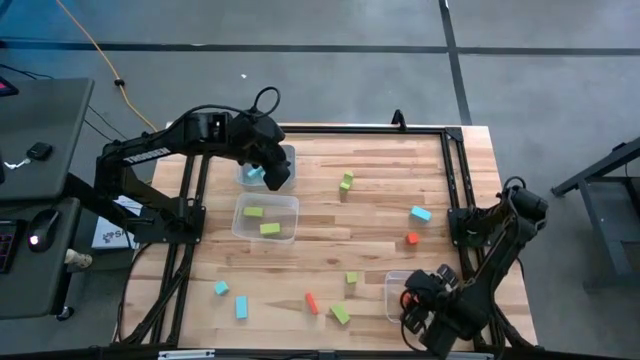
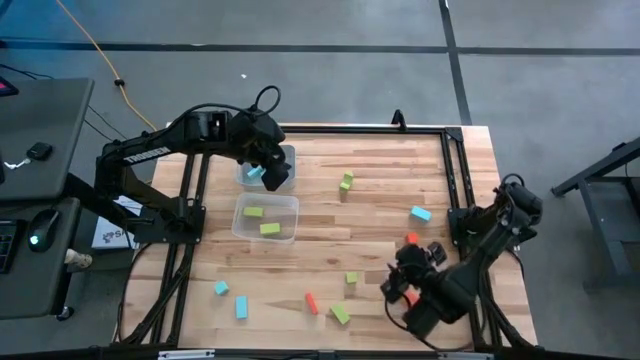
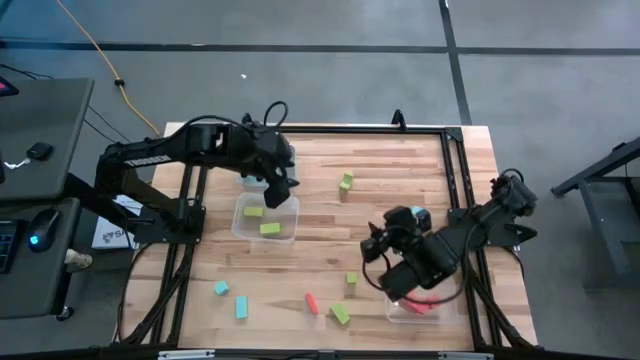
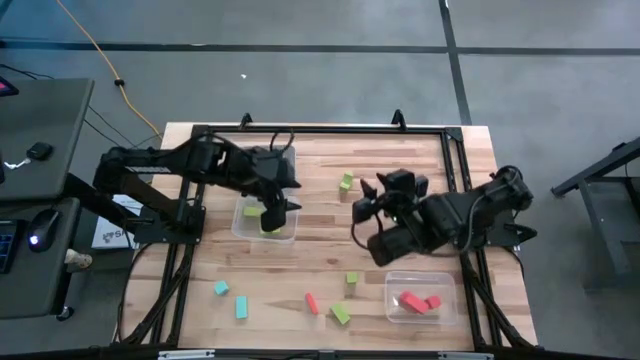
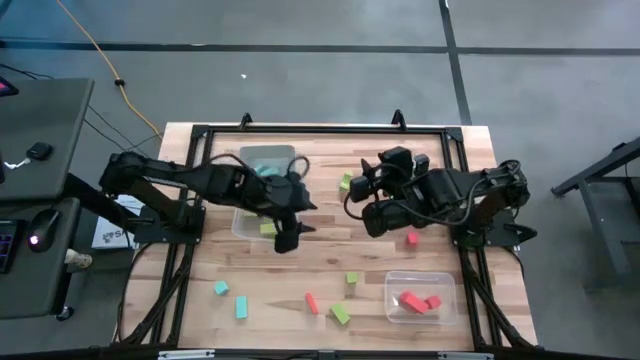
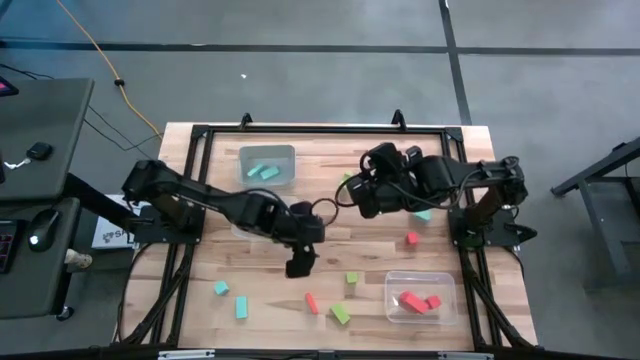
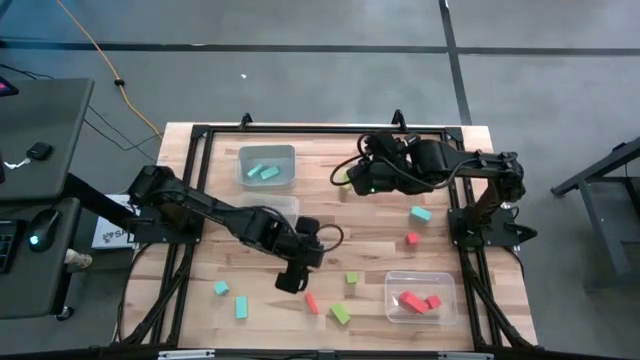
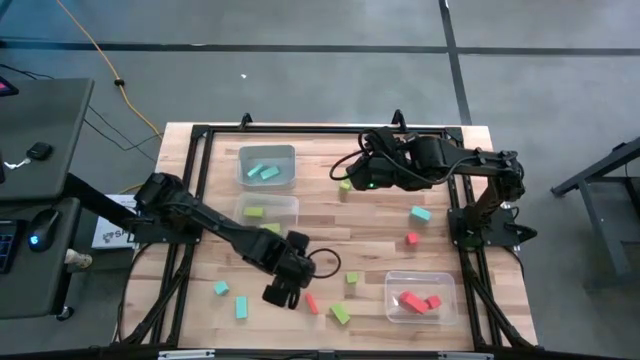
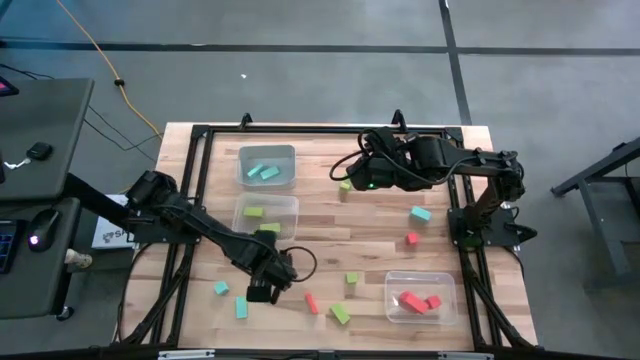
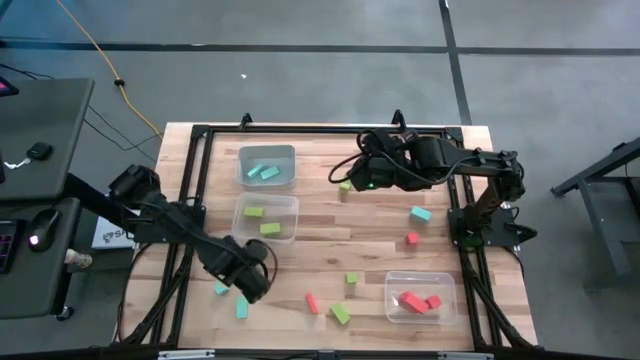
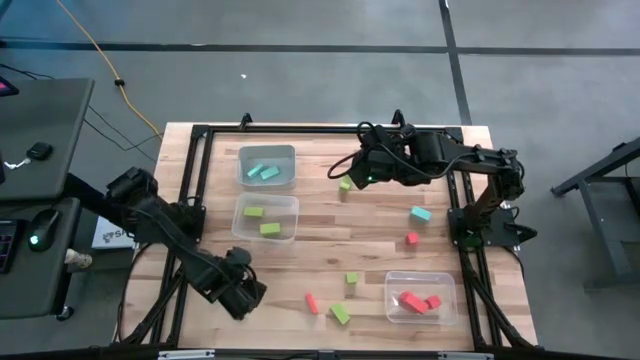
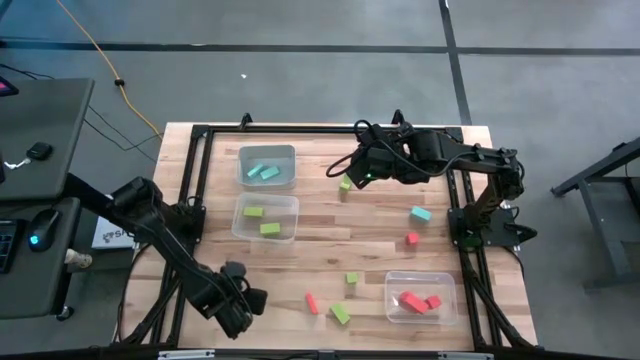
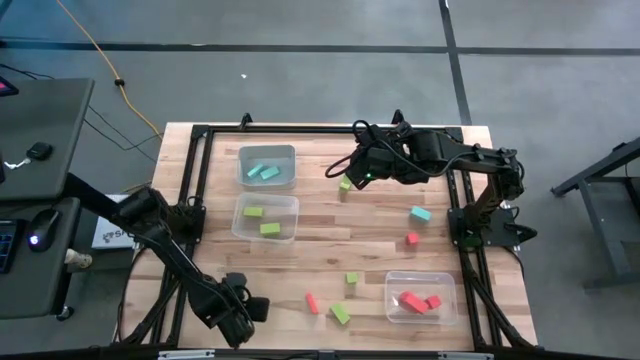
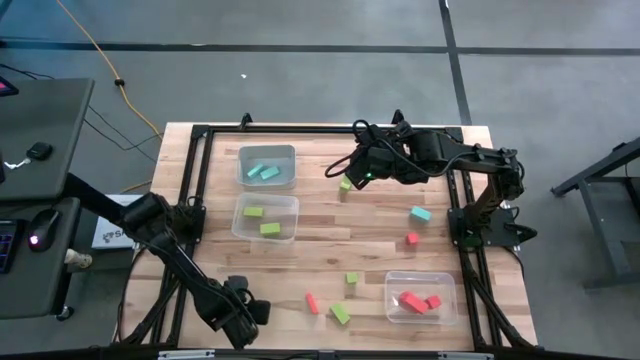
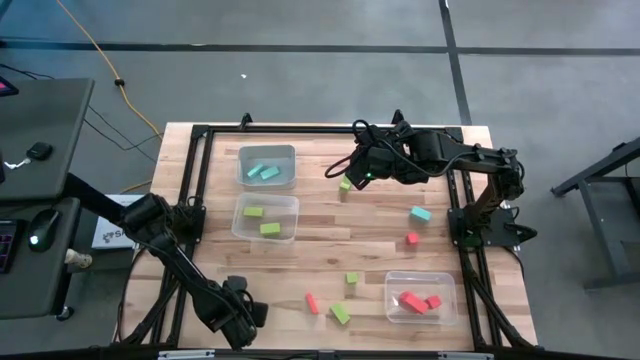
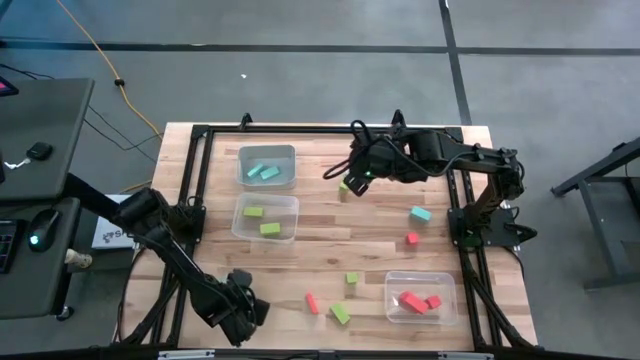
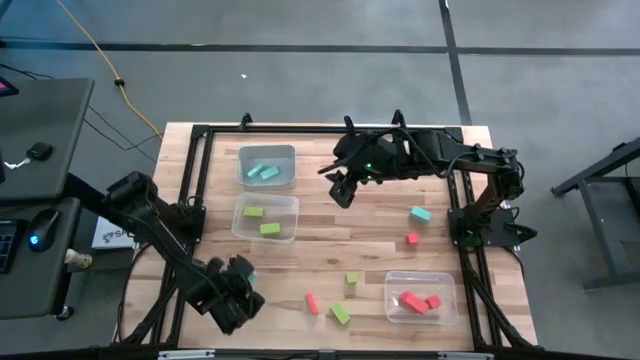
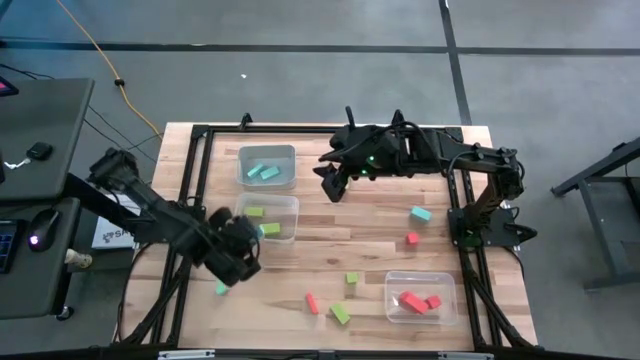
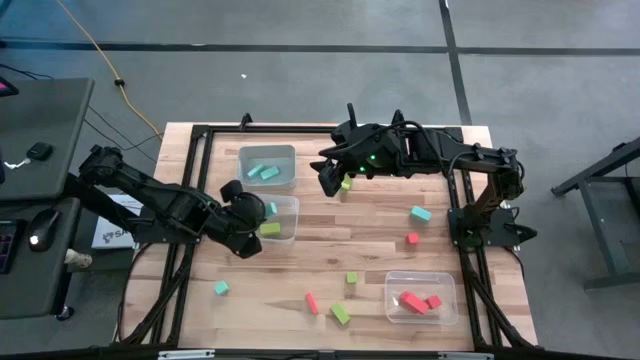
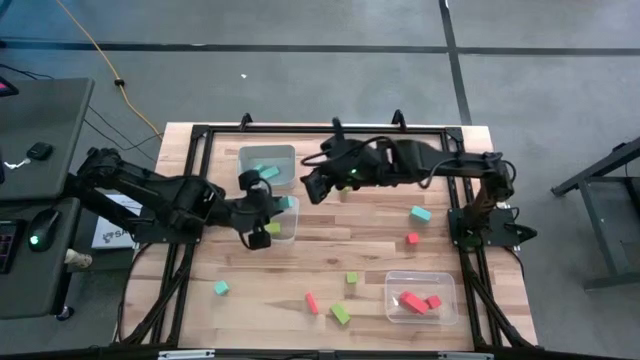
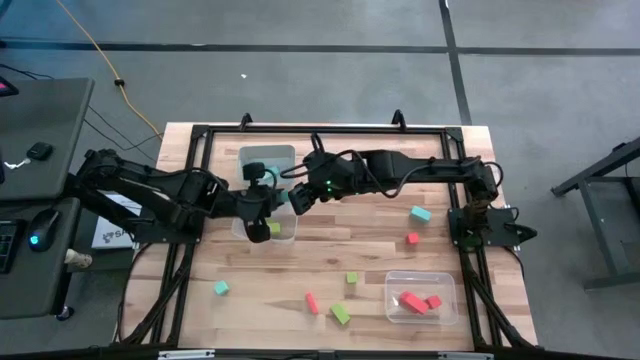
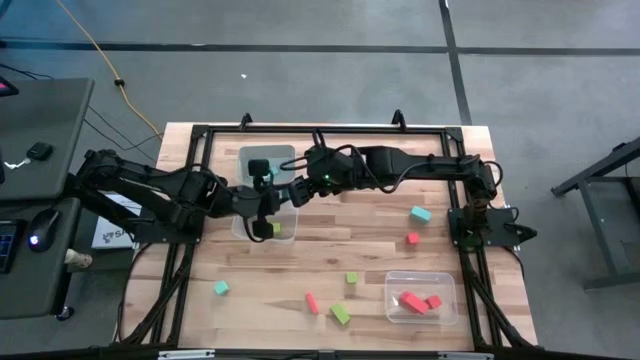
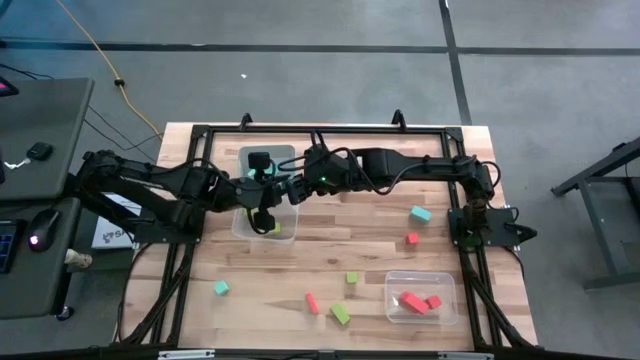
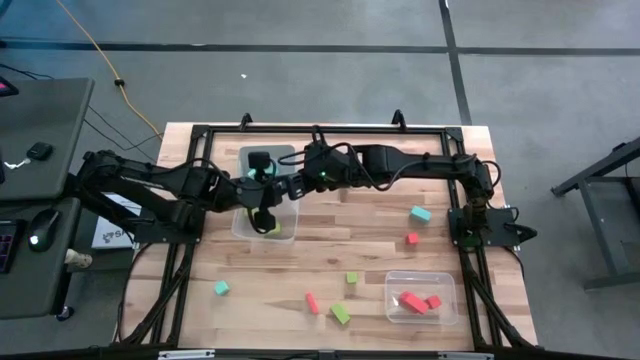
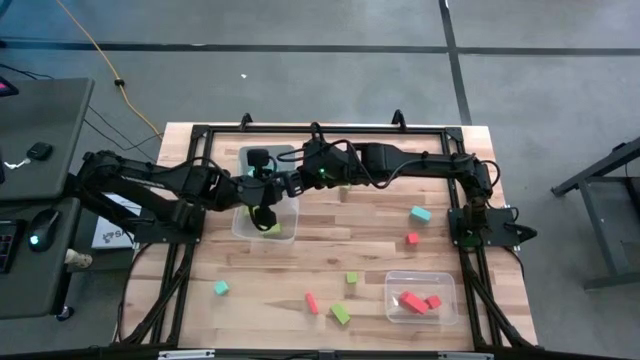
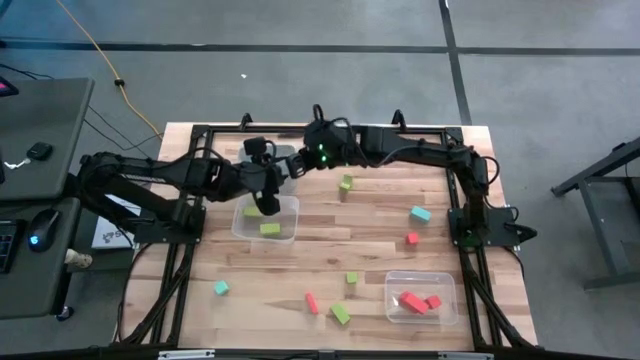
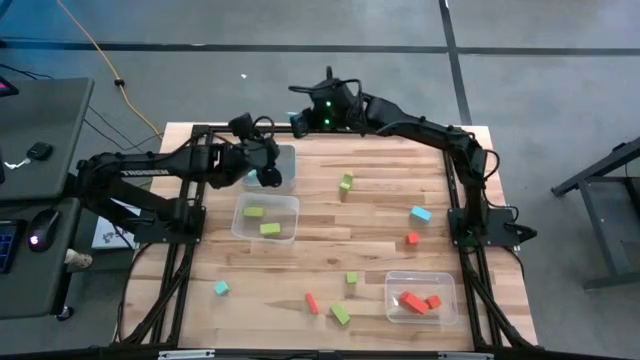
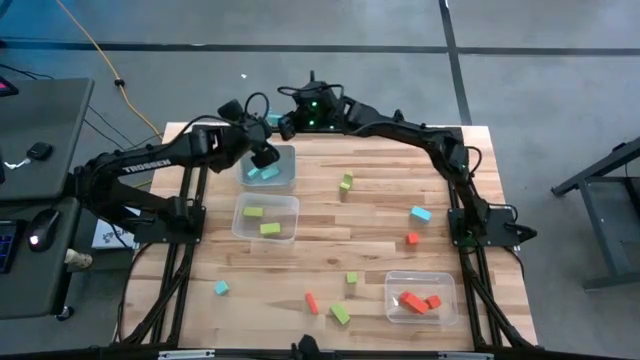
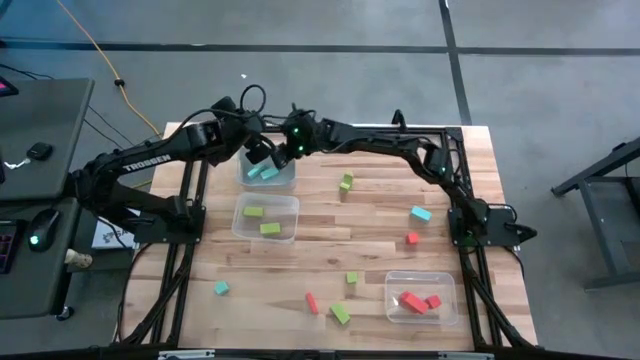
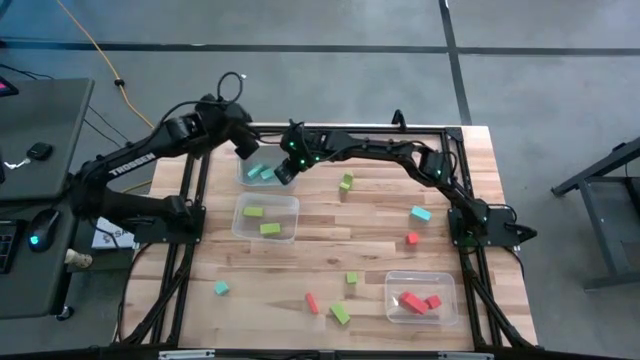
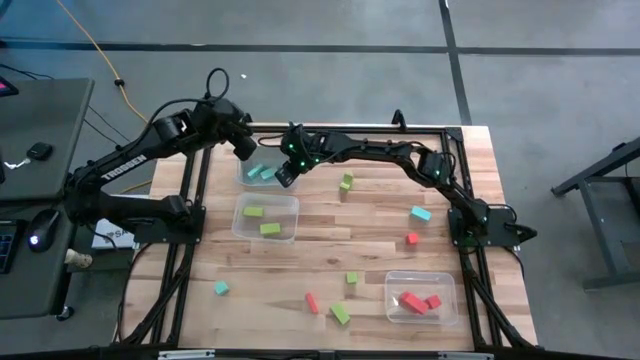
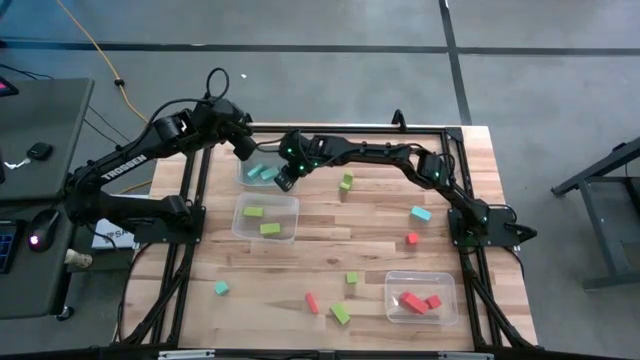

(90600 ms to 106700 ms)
Task: Sort & place blocks by color
Put the blue block into the gray bin

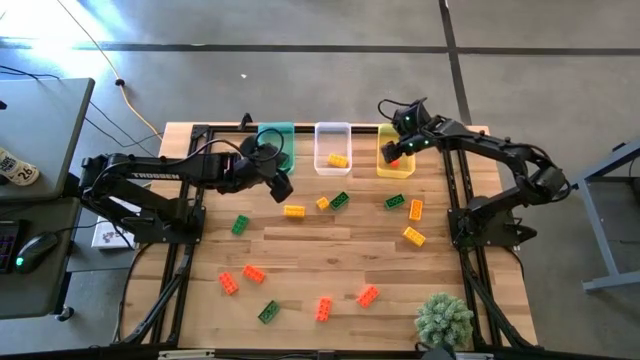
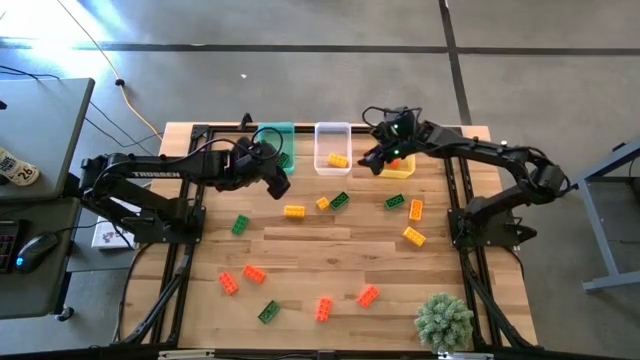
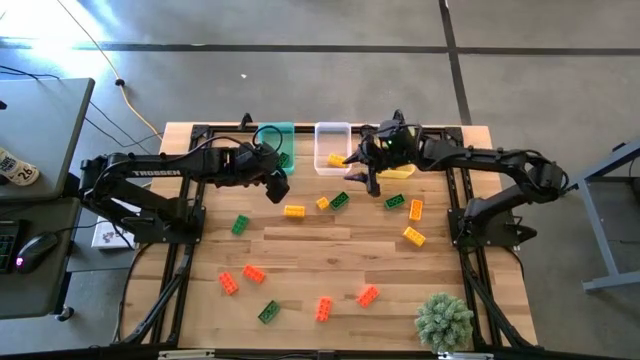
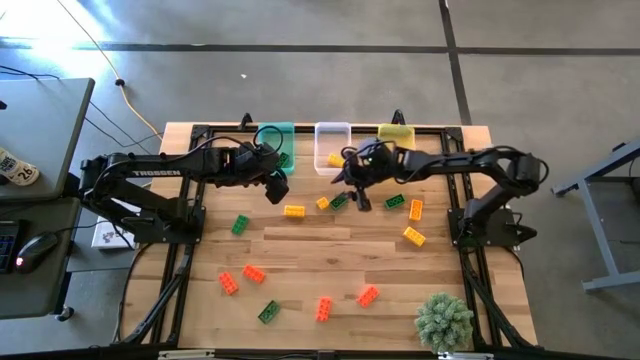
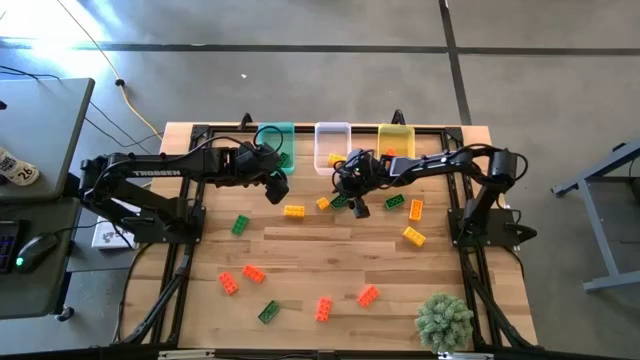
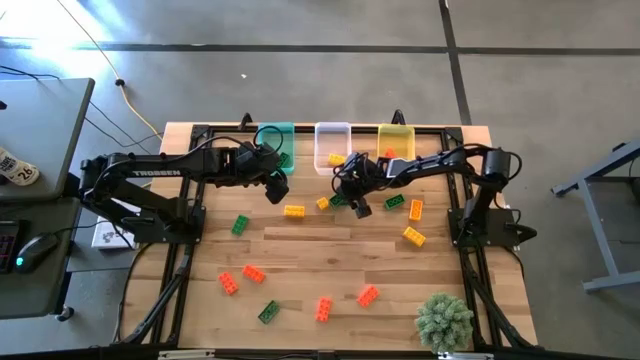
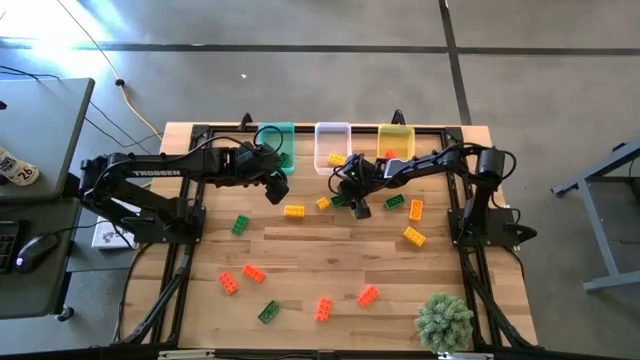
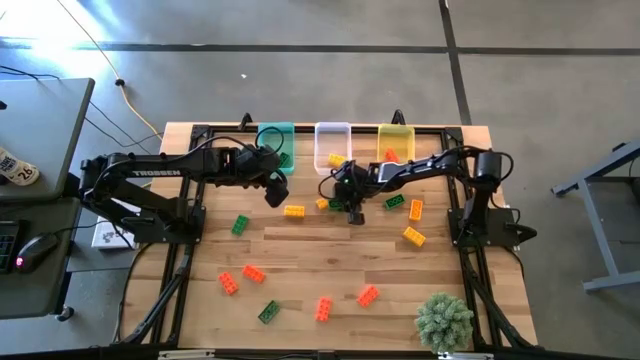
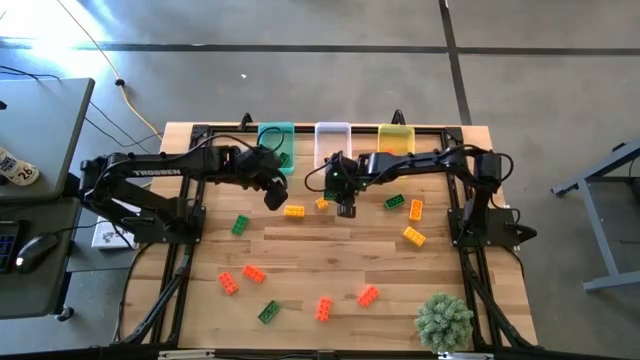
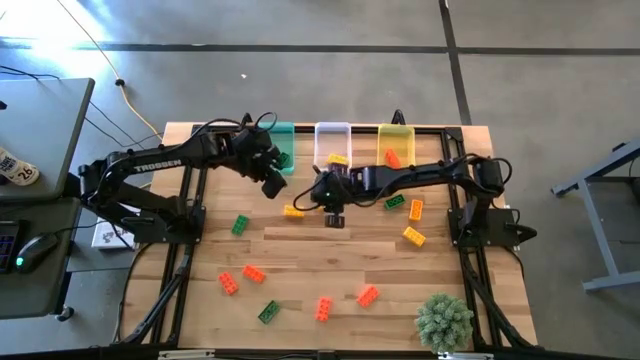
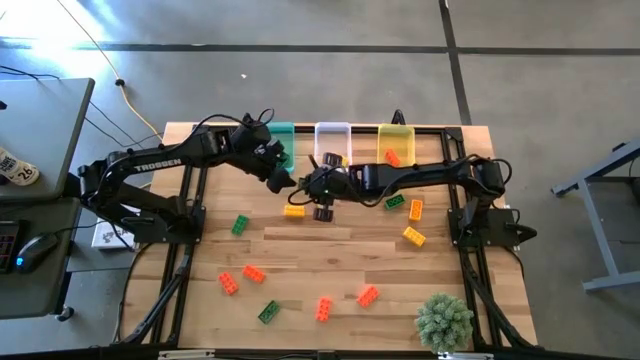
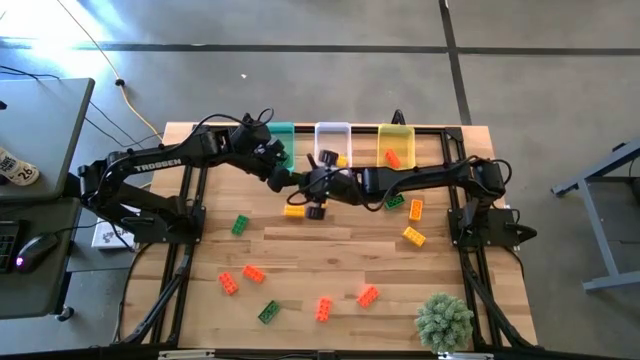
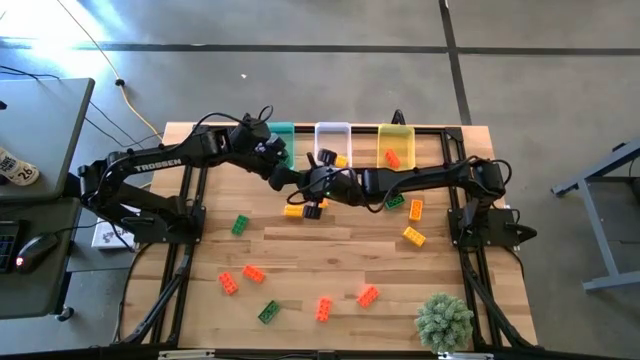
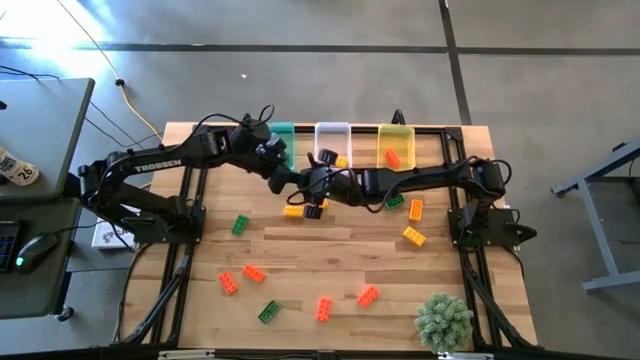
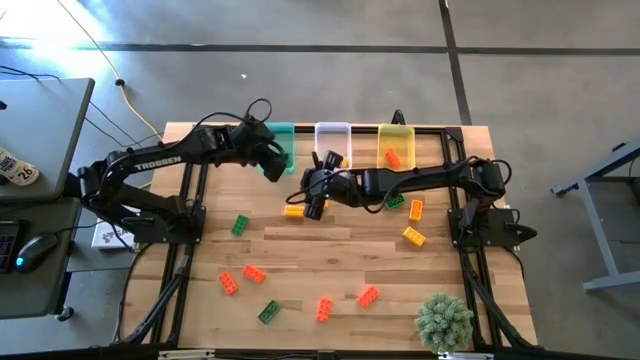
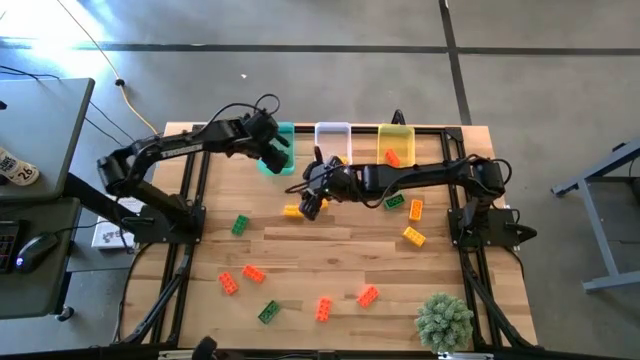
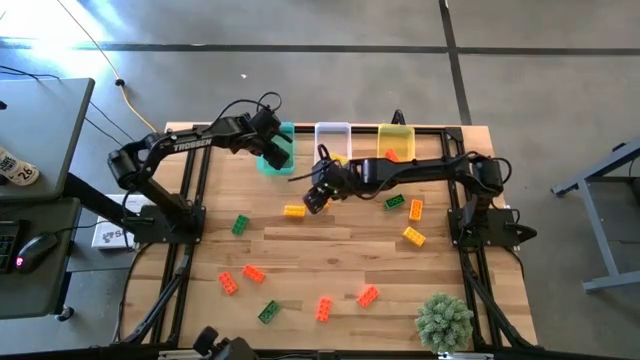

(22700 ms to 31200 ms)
Task: Sort & place blocks by color
Put the green game piece into the green bin
